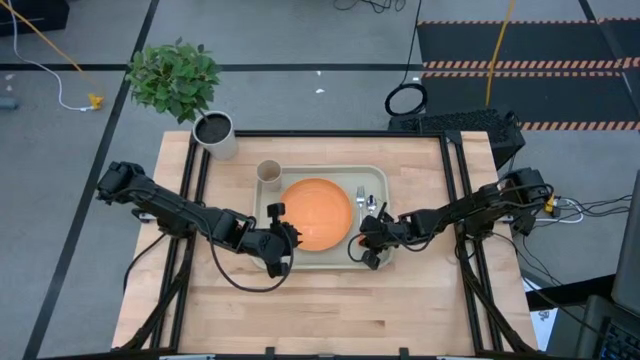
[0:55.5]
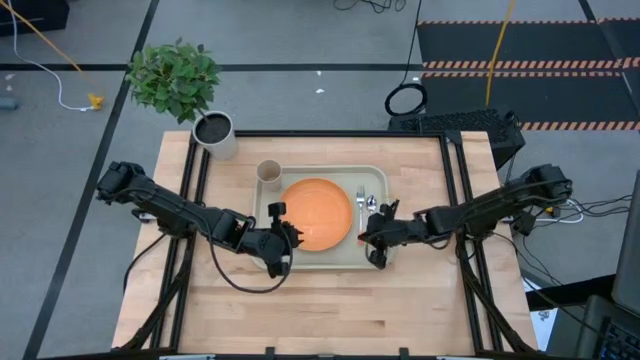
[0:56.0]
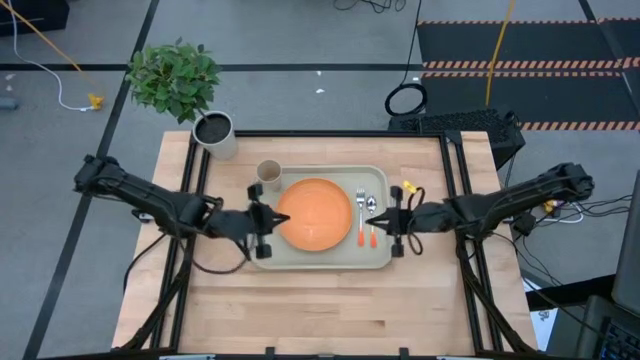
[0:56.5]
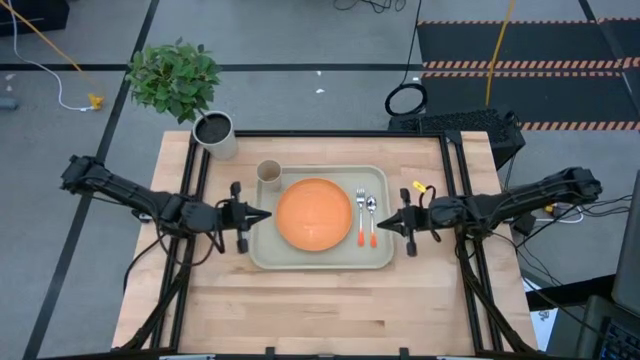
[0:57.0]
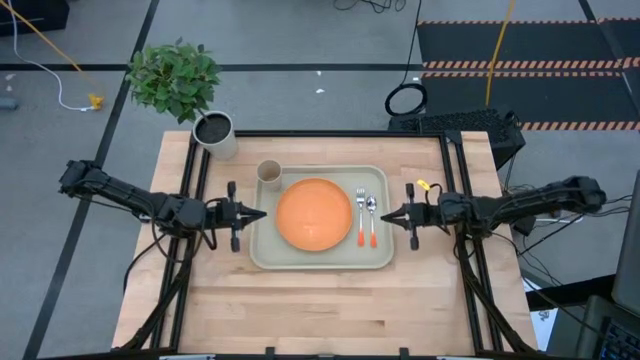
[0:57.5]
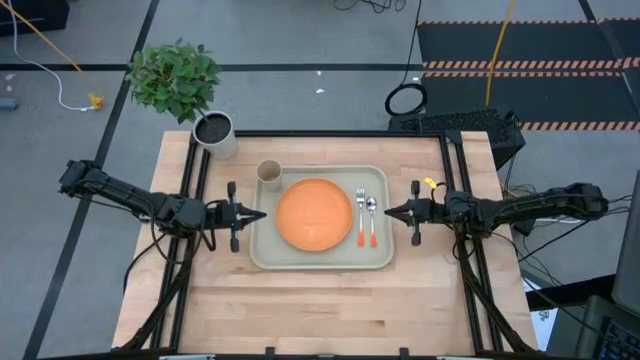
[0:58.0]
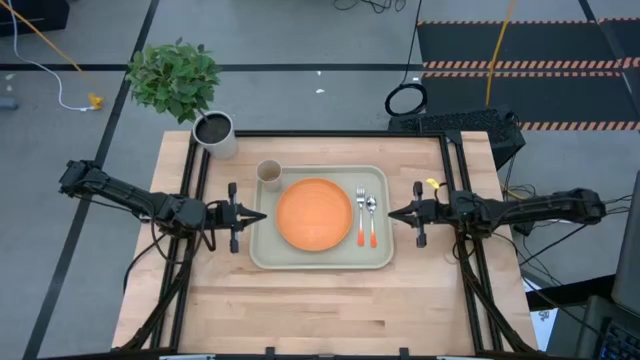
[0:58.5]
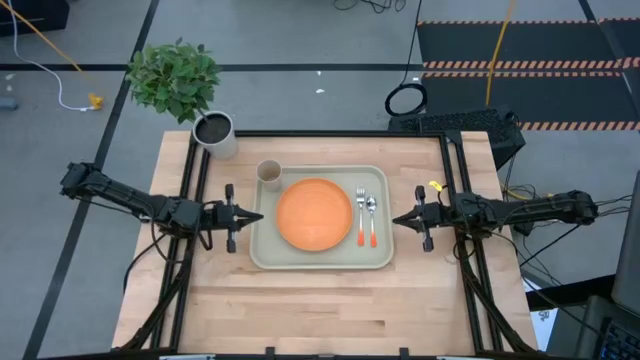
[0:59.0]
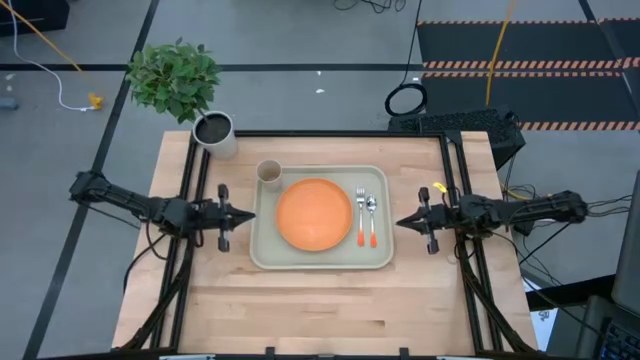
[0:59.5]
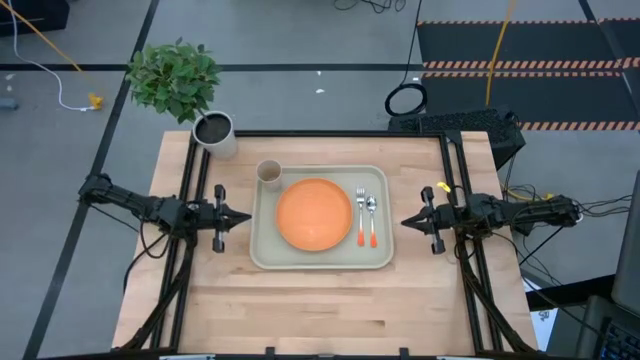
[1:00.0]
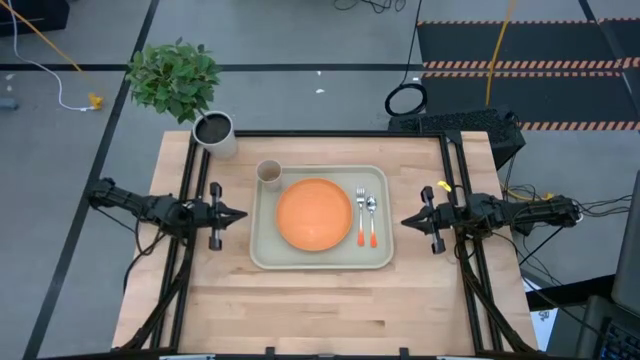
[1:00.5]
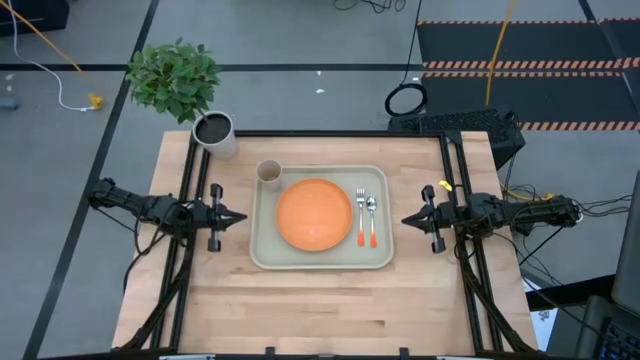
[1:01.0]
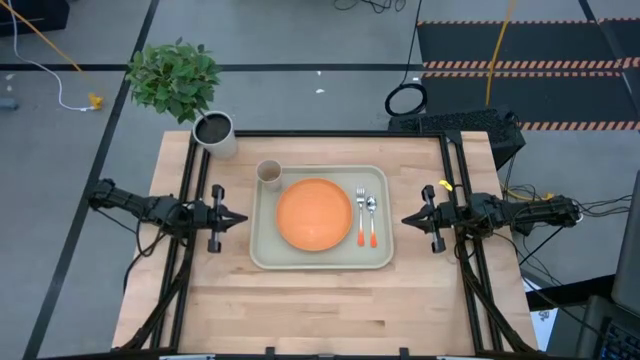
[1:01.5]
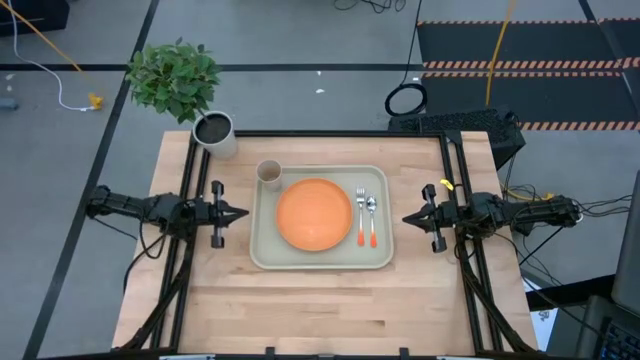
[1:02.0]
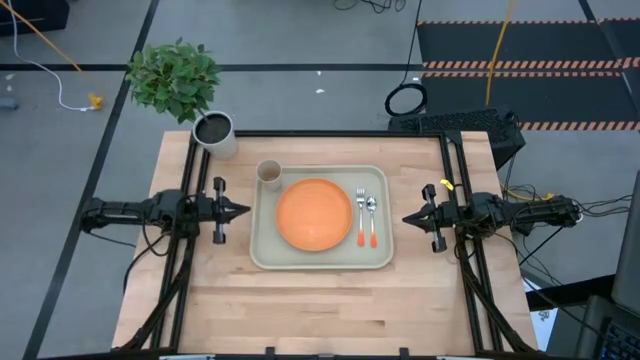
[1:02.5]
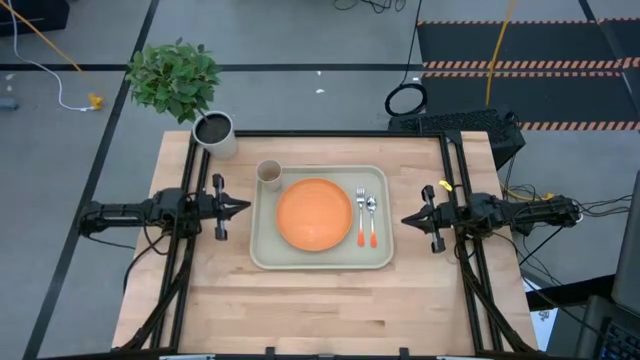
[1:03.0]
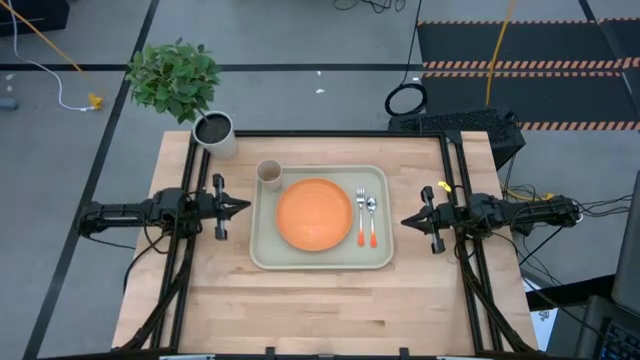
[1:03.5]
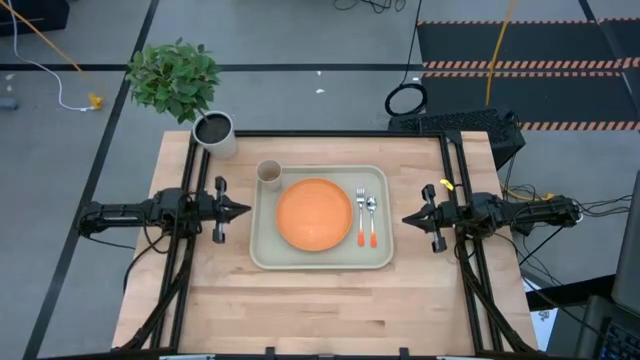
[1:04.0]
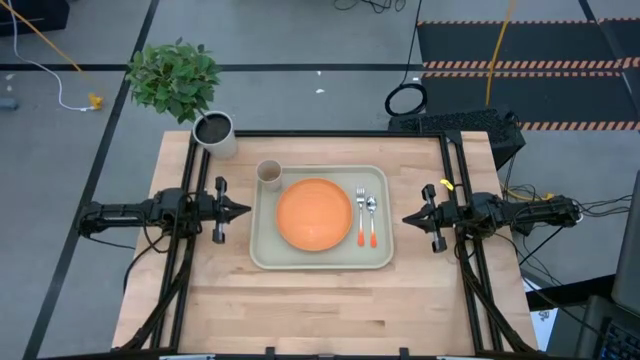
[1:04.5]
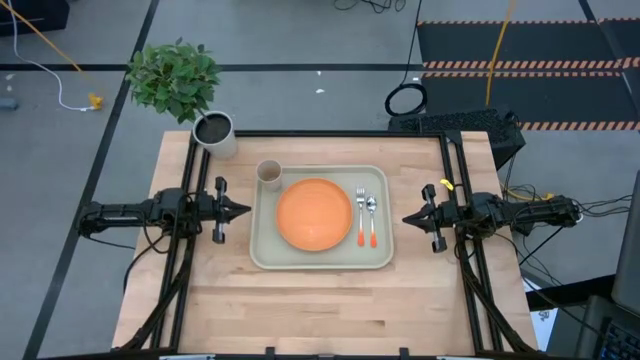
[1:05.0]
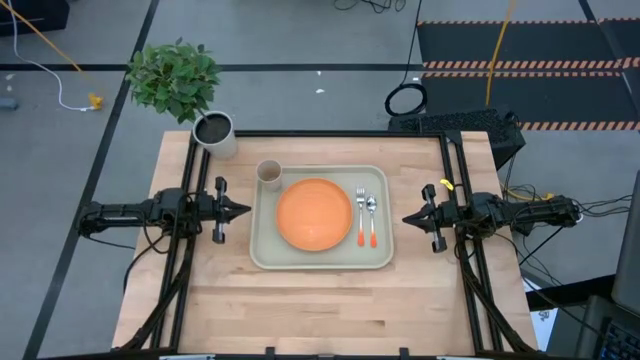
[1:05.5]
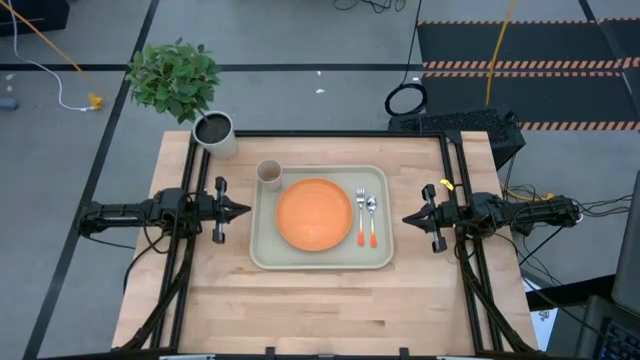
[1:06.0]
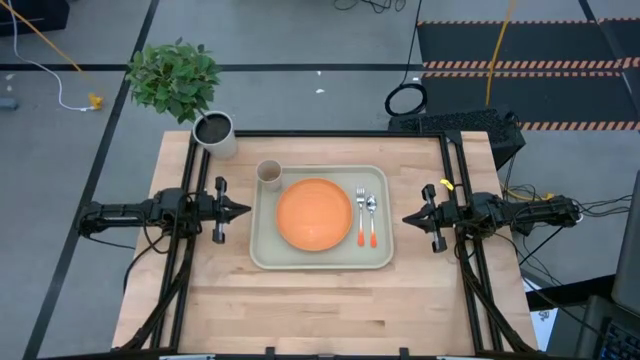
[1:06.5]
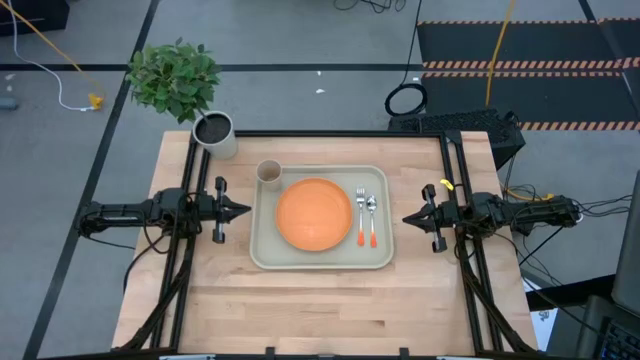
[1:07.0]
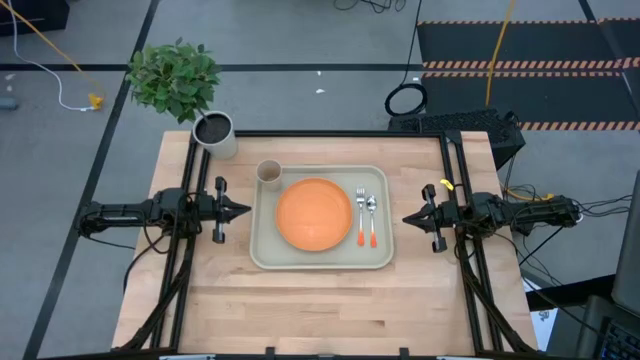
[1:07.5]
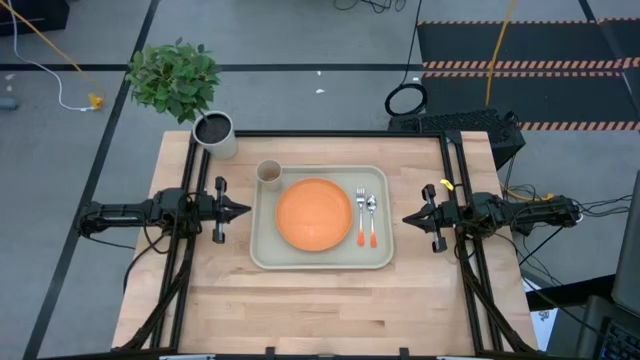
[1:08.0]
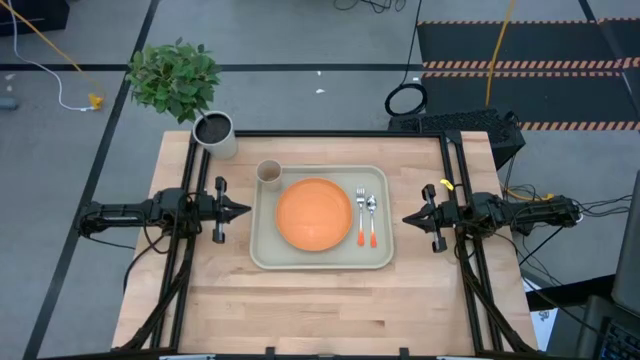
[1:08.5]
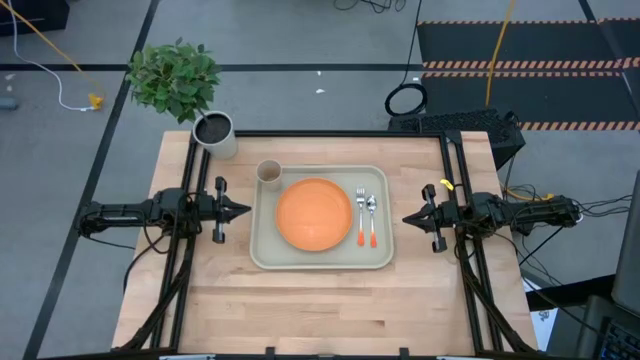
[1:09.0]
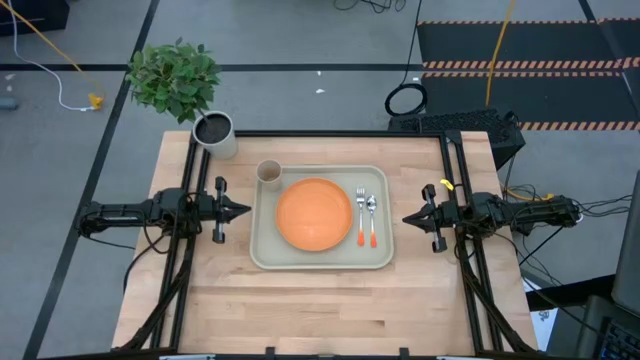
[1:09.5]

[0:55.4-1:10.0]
Task: Pick and place plate/cup/fork/spoon on tray
Return to Home Position

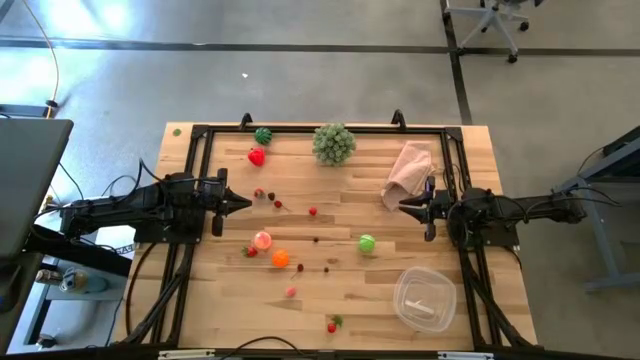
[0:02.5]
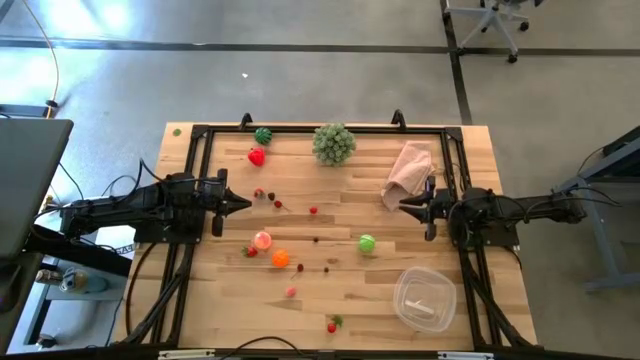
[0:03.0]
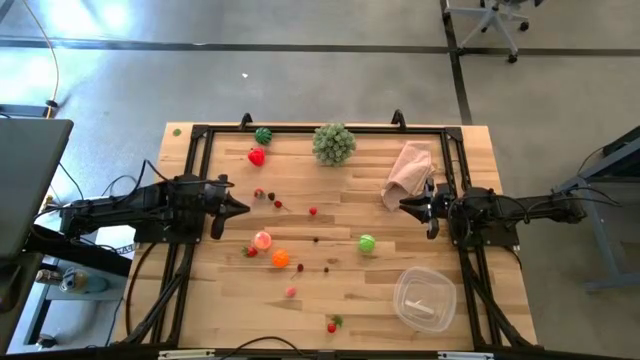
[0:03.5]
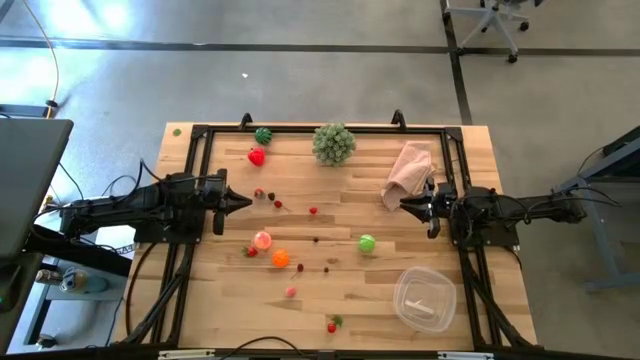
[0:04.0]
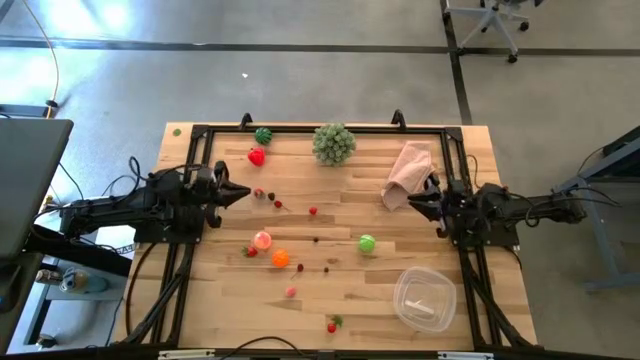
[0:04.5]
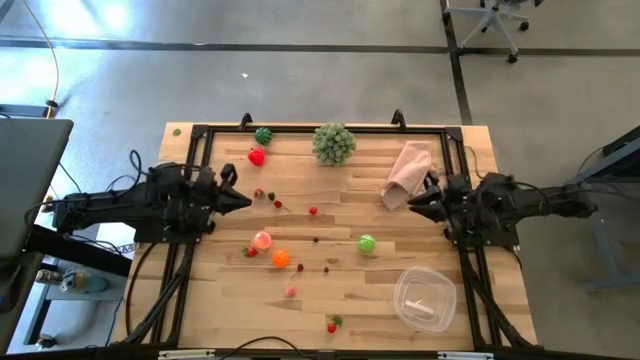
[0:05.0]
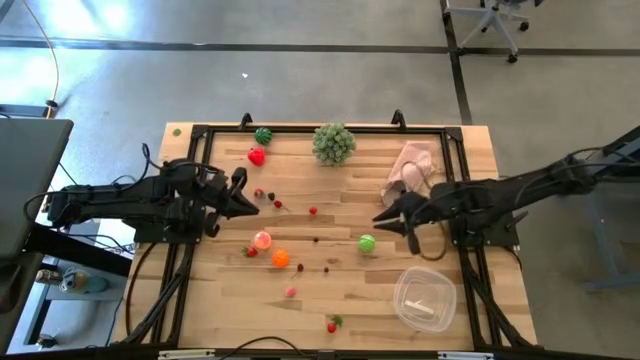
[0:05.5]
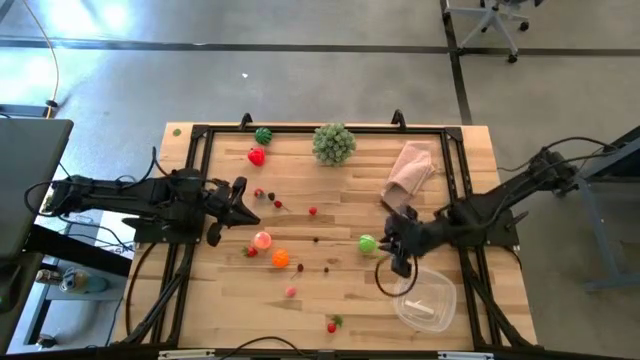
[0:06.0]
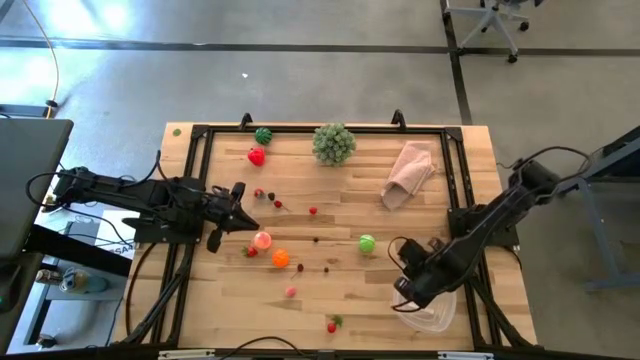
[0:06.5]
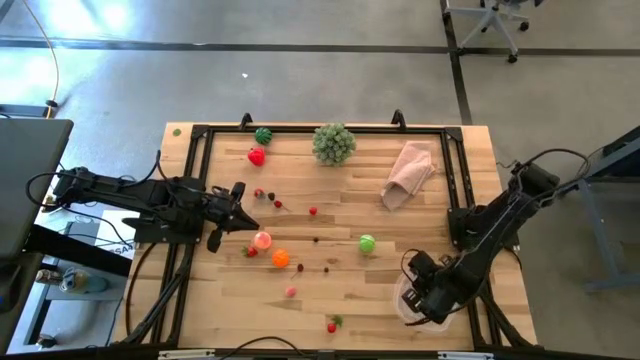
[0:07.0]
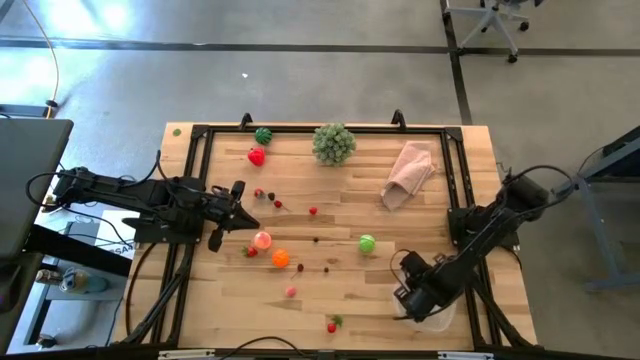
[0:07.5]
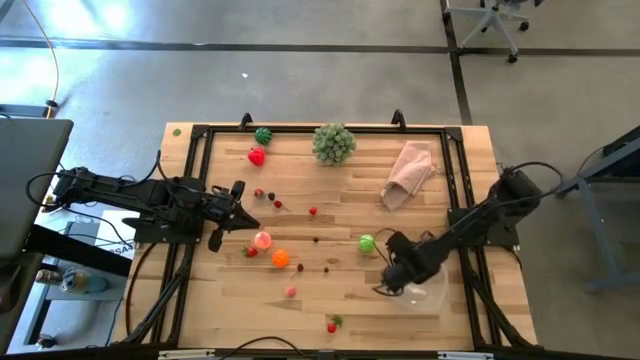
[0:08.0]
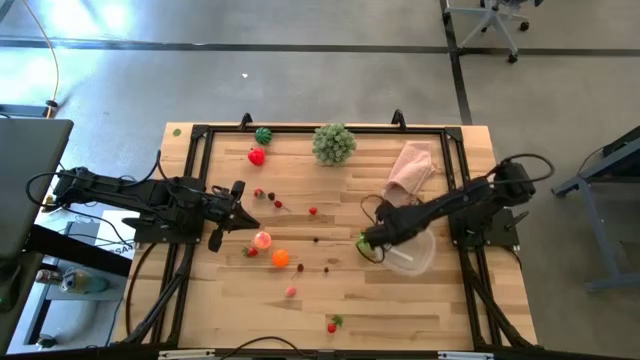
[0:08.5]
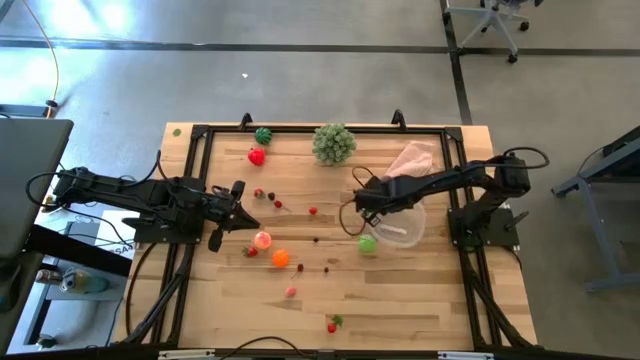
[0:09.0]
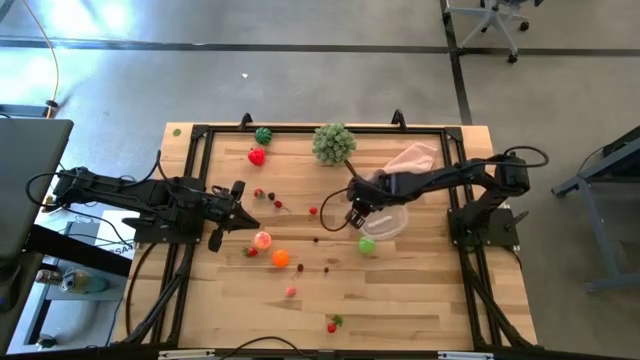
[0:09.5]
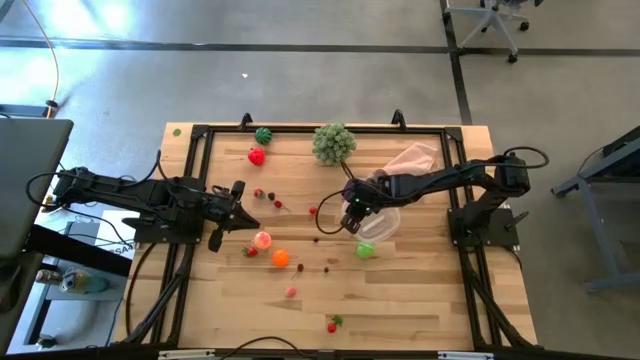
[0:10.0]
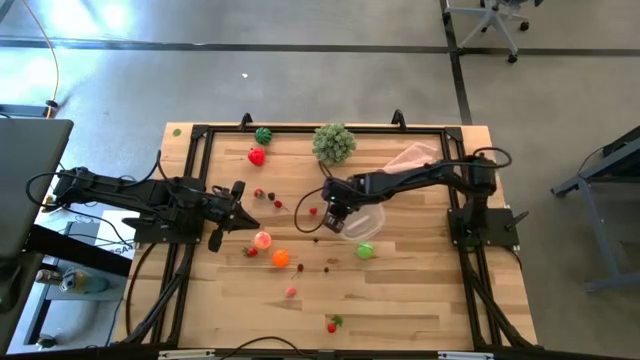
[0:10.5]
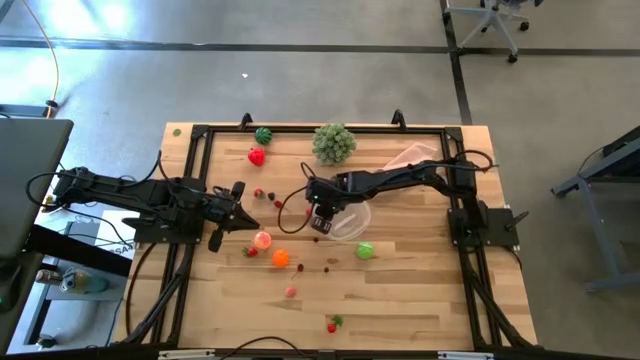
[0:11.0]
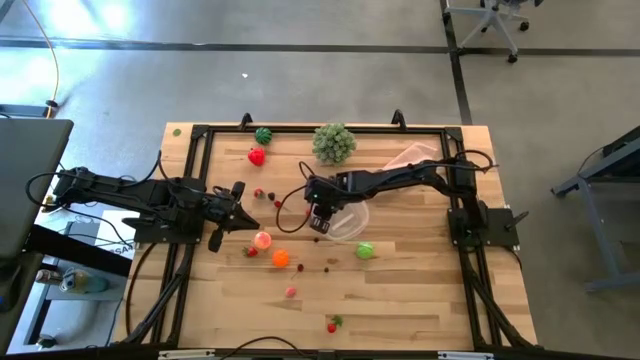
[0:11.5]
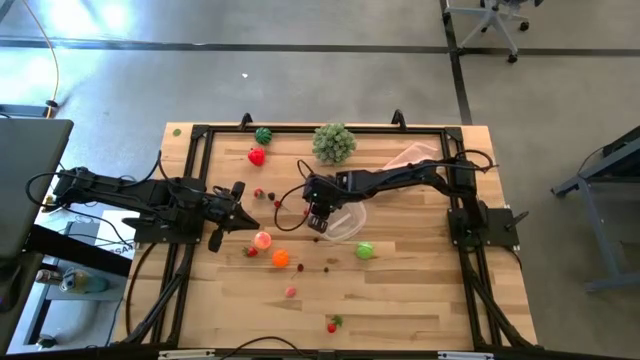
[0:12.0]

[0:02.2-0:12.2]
Task: Pick and placing Produce into tupperware
Move the container to the center of the table
